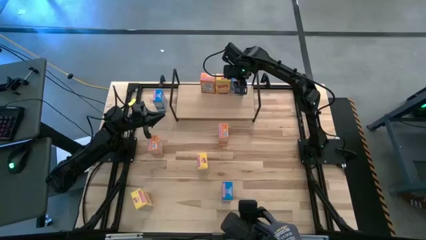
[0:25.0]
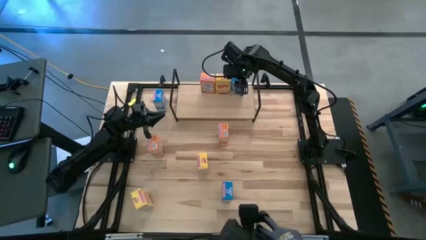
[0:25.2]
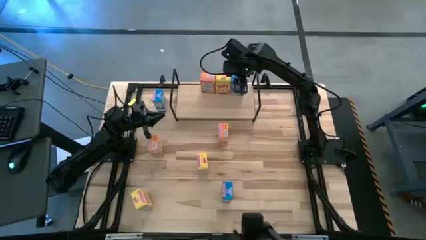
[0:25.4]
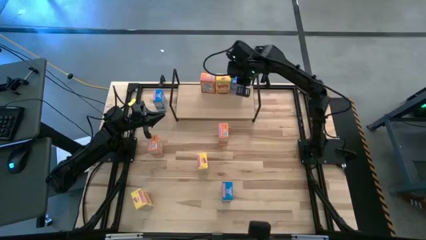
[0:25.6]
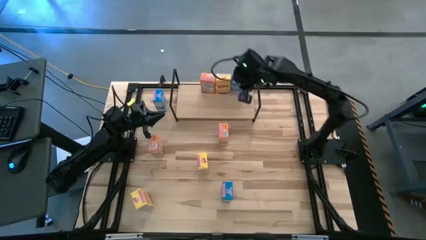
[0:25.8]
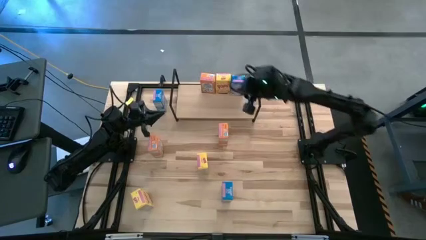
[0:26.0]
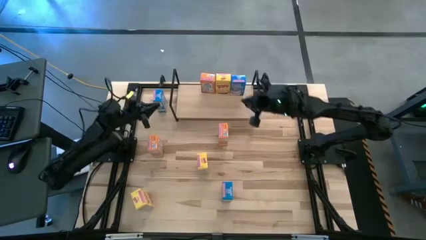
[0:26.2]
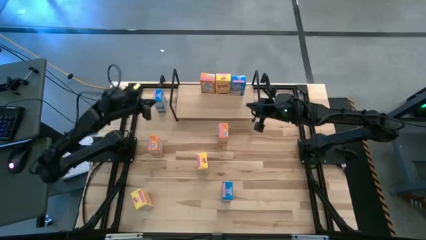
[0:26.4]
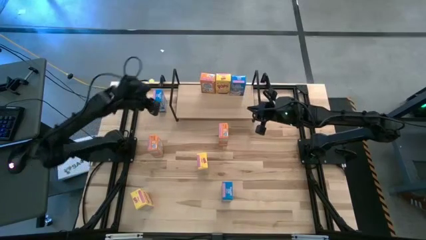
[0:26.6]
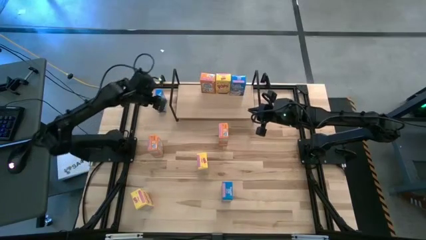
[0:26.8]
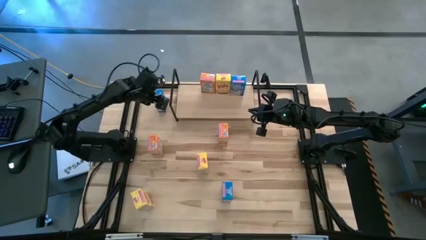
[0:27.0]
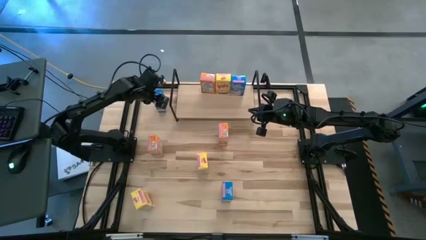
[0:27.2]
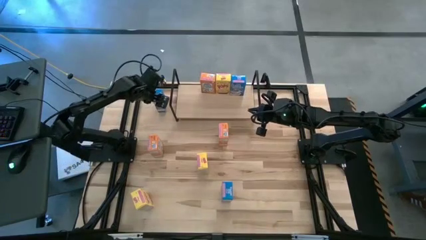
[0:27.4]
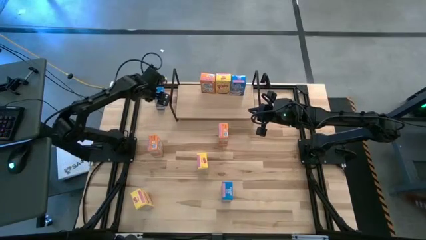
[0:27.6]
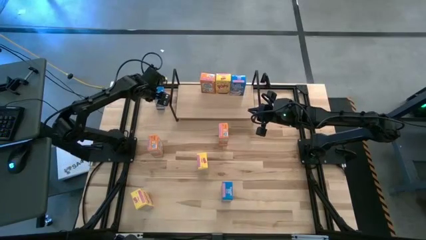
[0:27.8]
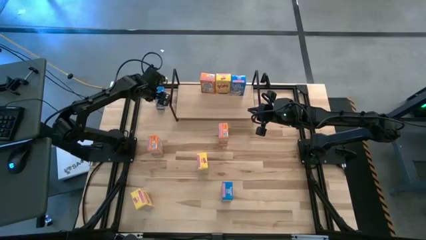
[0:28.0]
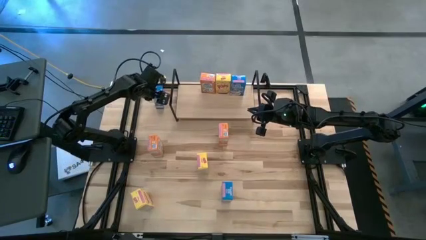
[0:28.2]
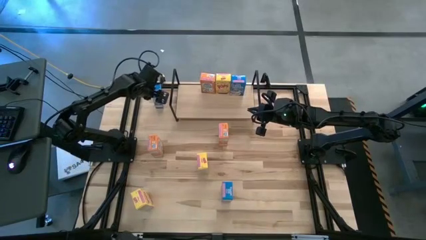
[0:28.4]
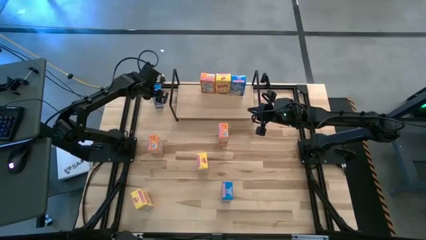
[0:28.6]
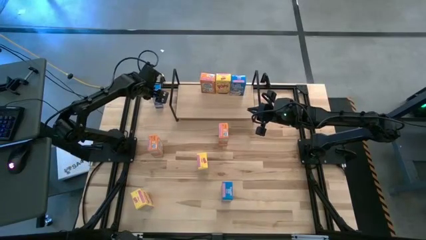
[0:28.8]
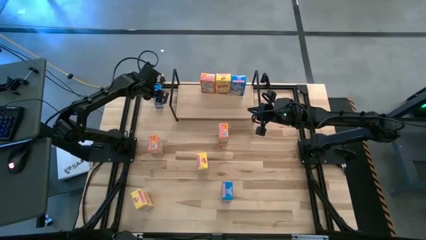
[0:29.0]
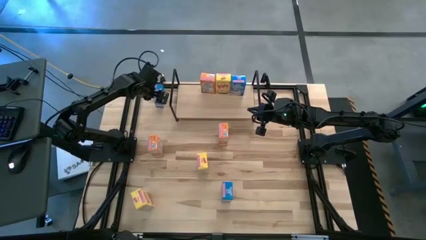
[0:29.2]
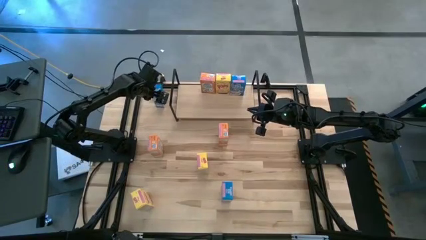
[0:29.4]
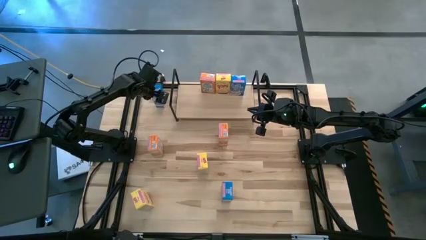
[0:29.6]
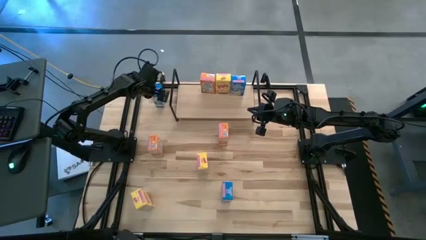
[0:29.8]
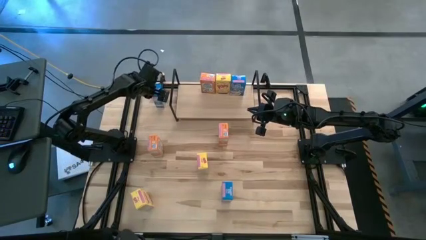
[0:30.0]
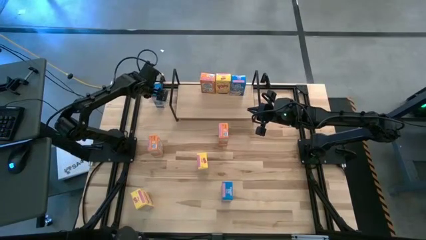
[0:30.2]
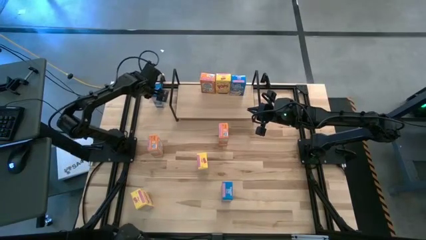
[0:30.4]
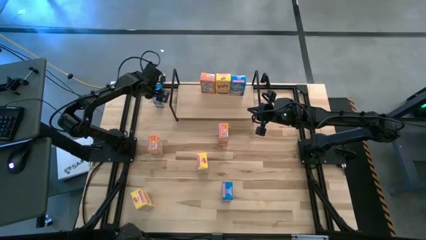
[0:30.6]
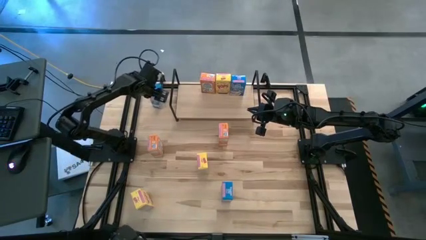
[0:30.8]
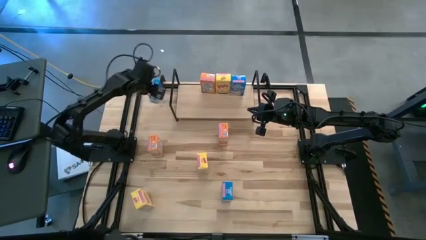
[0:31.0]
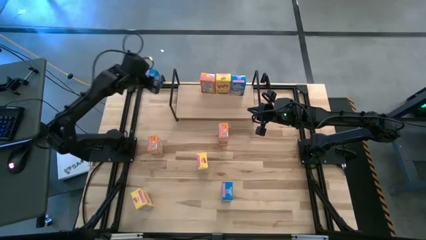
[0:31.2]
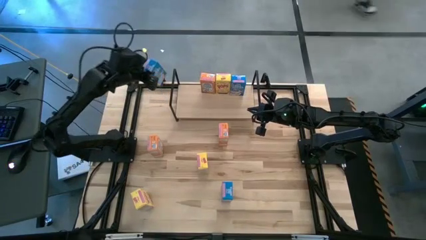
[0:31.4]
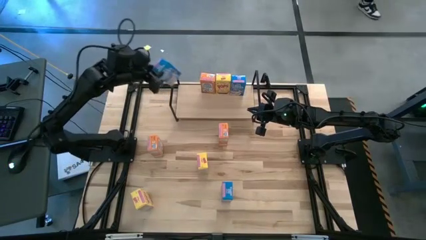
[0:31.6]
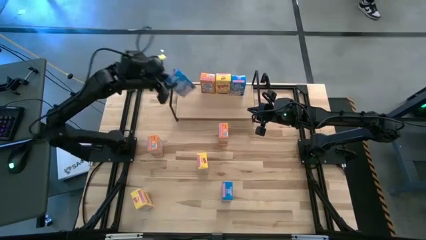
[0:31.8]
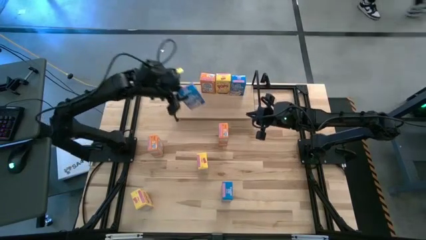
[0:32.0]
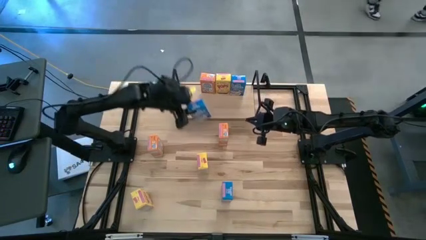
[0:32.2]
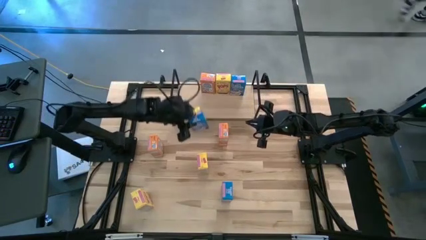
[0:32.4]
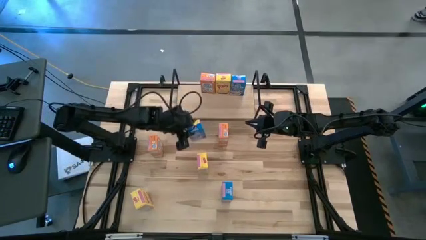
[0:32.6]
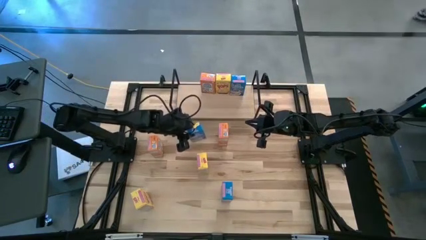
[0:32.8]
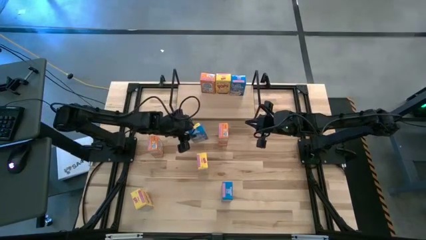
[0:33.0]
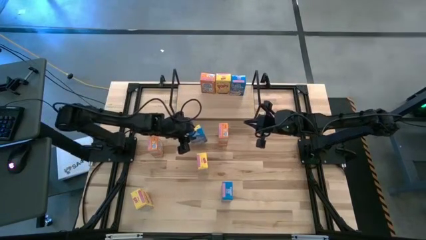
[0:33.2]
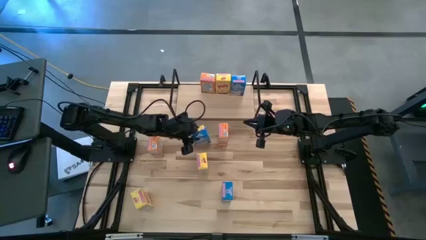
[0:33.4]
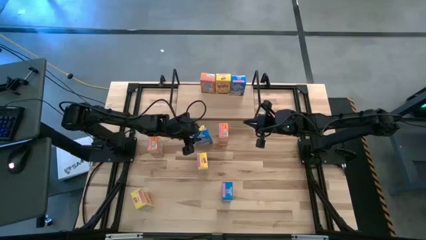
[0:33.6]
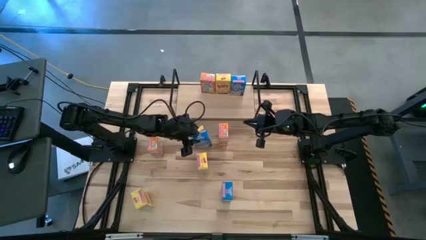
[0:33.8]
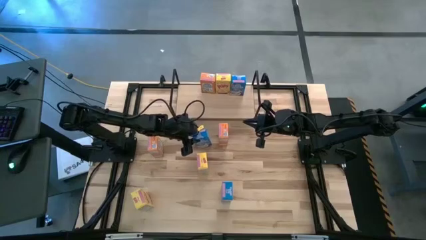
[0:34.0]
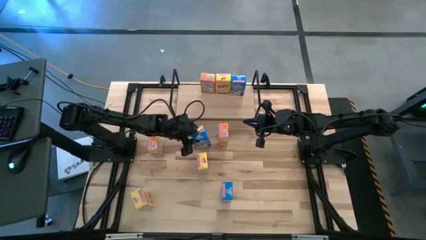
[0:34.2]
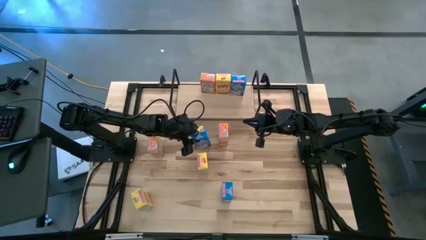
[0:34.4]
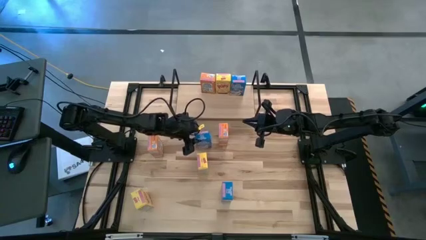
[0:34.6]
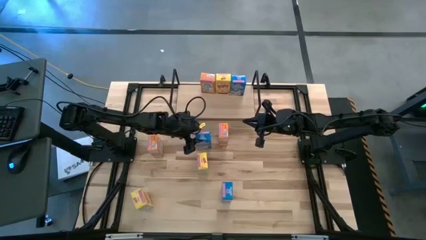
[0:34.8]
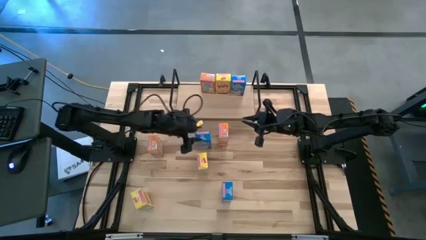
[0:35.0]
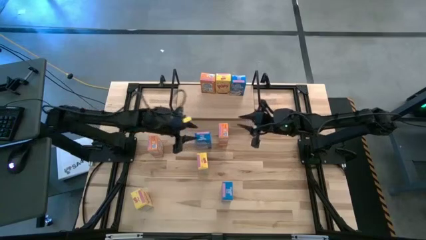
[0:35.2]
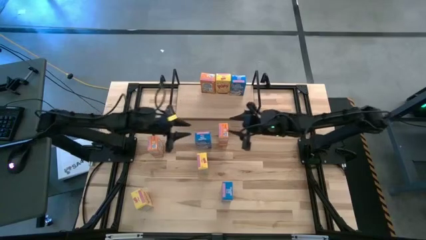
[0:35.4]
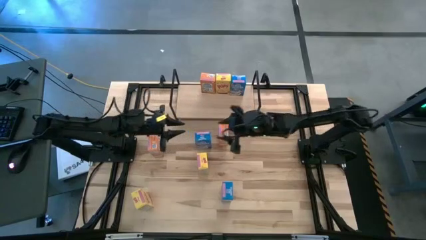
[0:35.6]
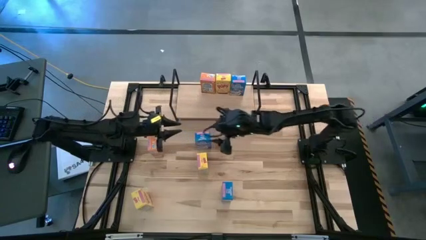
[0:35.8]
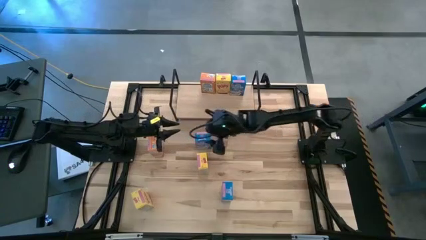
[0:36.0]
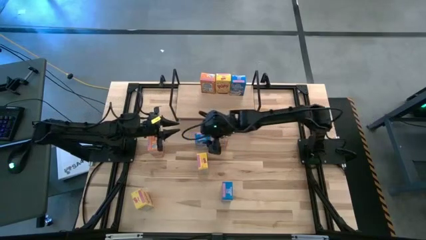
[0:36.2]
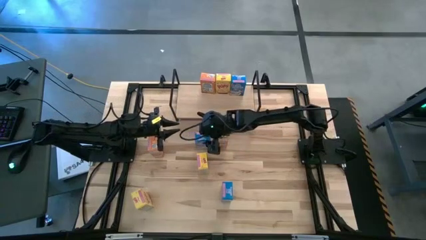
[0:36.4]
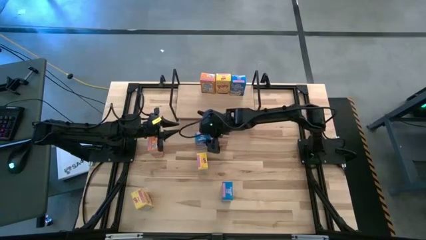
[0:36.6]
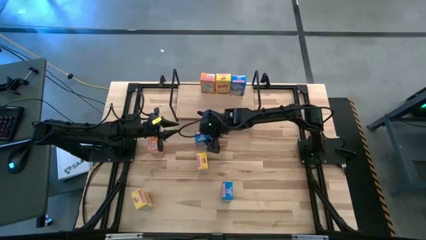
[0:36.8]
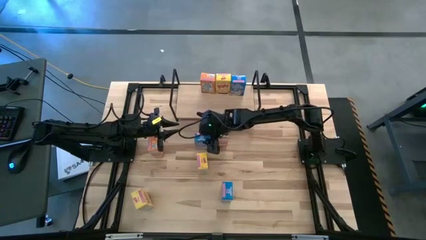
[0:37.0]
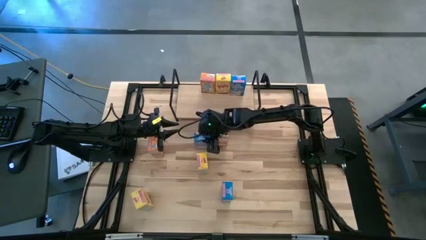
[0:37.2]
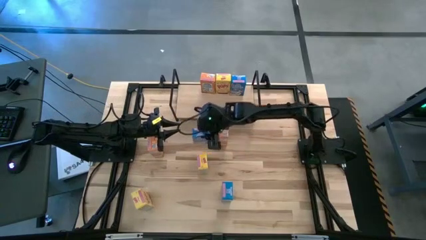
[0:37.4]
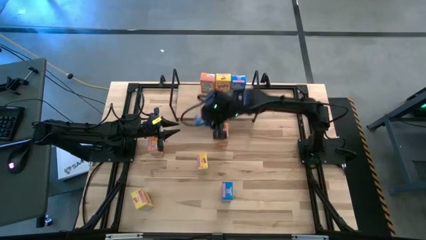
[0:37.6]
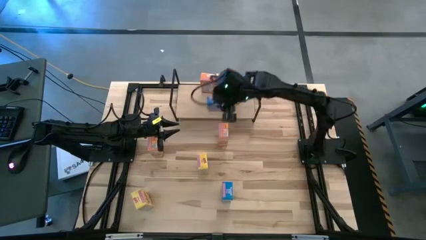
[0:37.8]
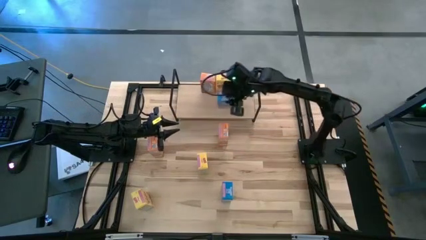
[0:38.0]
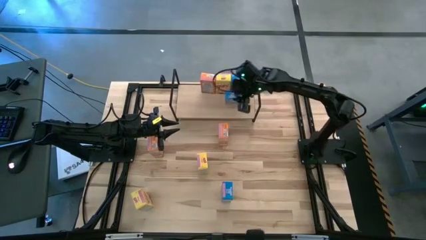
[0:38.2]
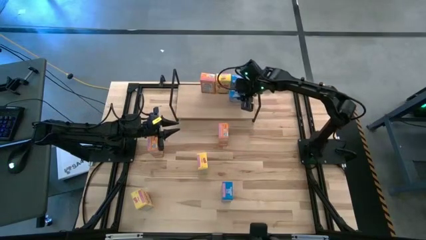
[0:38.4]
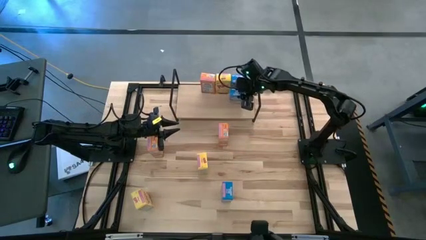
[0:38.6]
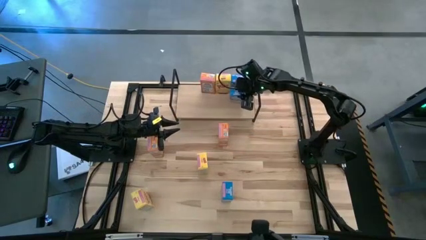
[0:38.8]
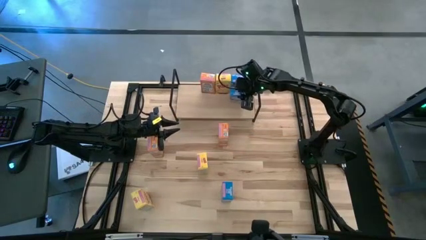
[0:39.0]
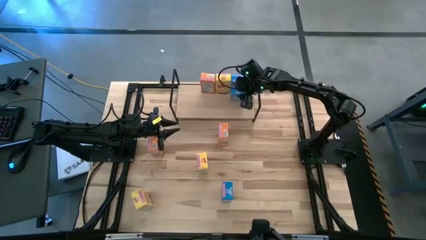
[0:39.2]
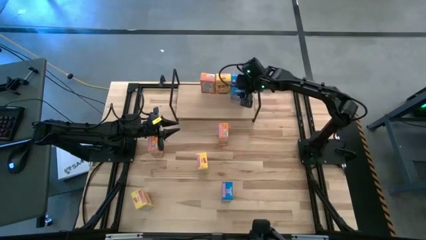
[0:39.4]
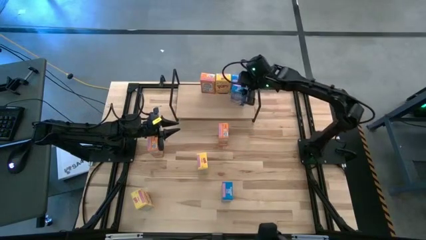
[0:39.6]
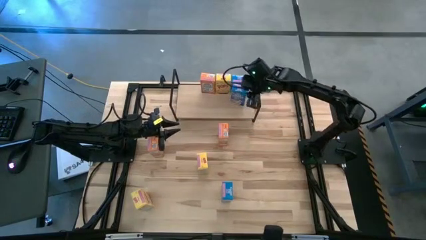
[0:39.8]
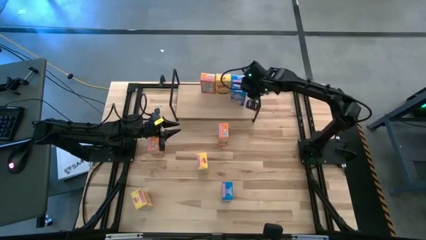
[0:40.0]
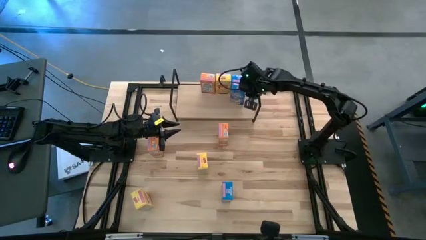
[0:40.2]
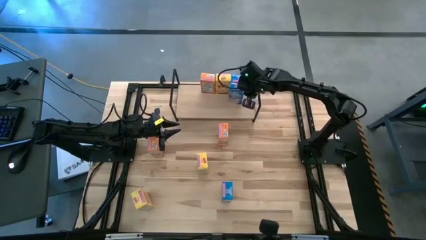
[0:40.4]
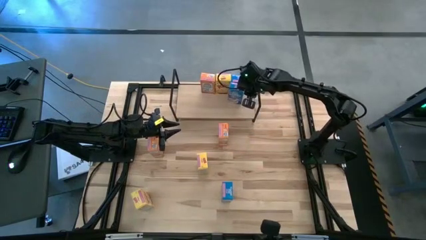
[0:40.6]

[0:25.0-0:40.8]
Task: Stack cereal on shelf
Put the top blue cereal box aligned with the other blue cereal box on the shelf

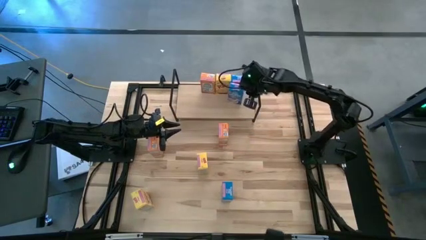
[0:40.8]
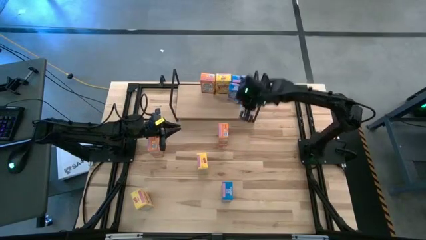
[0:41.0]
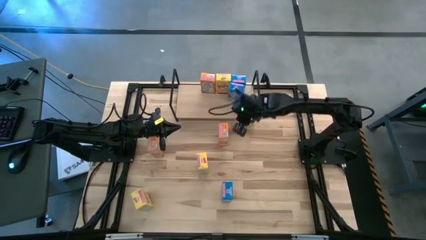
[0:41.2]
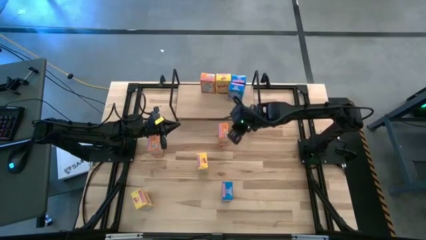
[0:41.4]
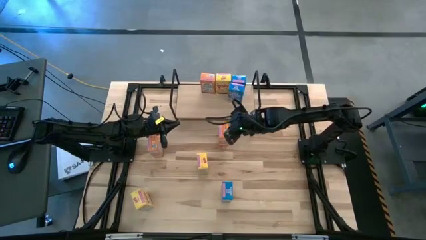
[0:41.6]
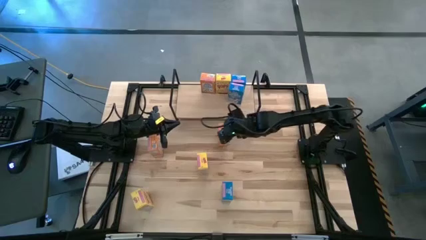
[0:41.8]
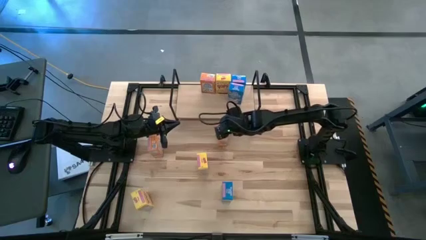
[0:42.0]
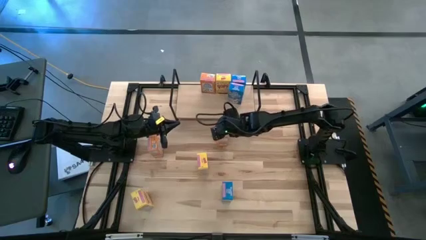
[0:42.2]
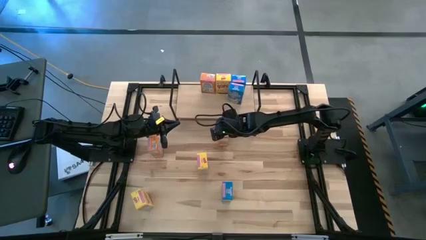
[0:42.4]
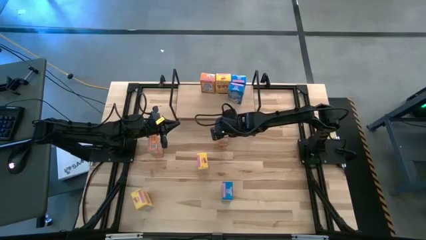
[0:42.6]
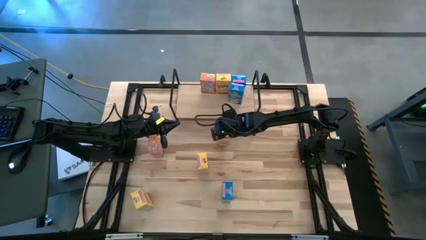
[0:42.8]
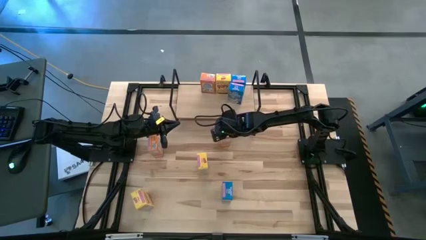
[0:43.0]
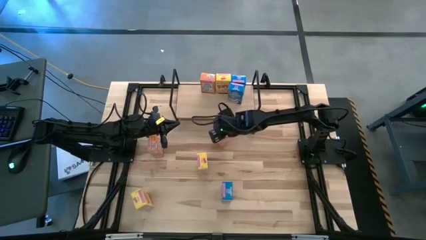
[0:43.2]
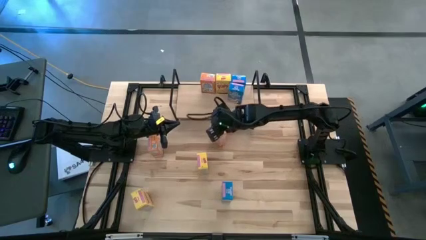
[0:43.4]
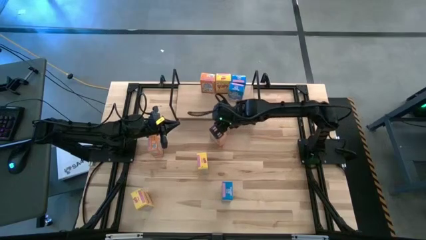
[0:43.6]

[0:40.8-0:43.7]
Put the right orange cereal box on the shelf
